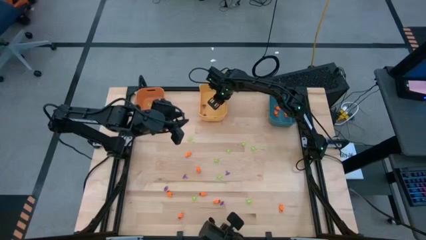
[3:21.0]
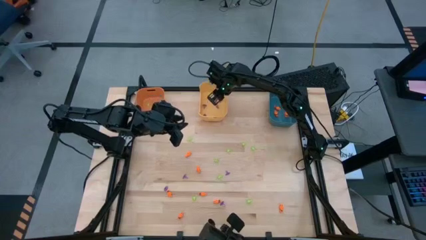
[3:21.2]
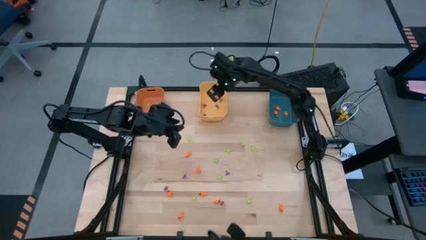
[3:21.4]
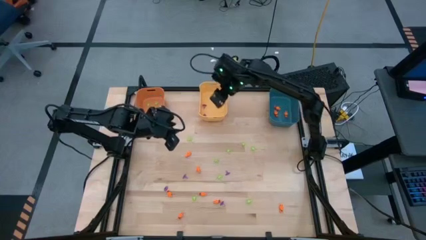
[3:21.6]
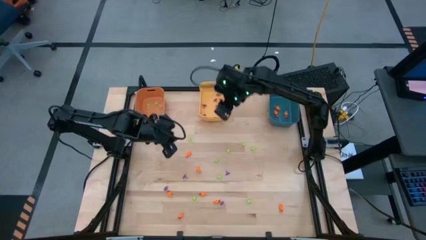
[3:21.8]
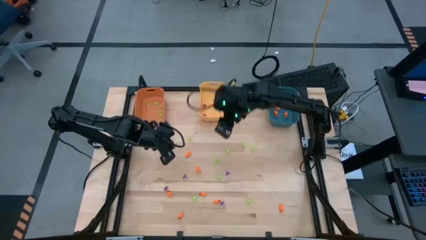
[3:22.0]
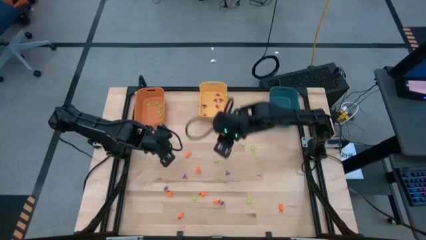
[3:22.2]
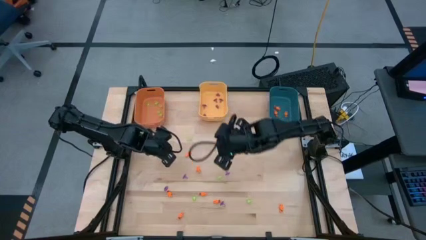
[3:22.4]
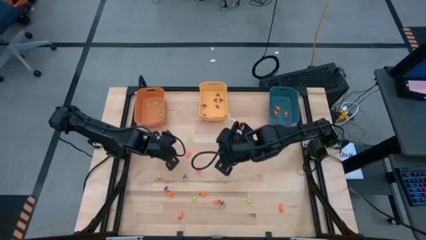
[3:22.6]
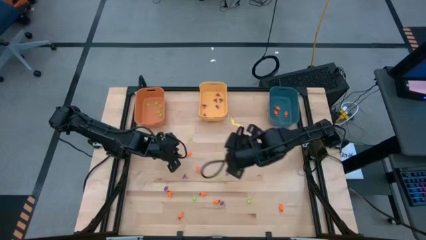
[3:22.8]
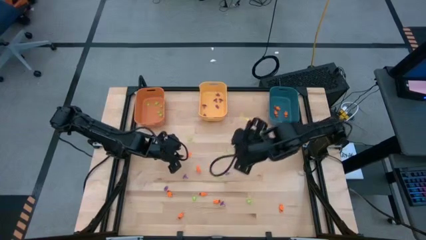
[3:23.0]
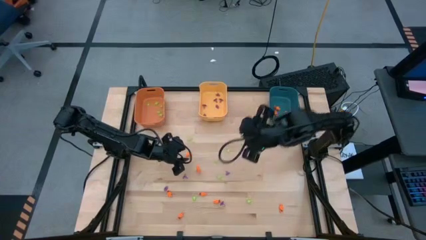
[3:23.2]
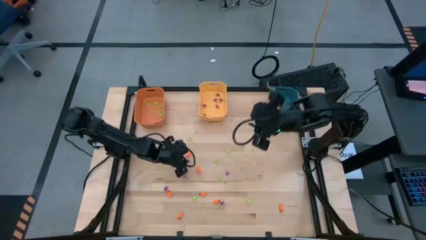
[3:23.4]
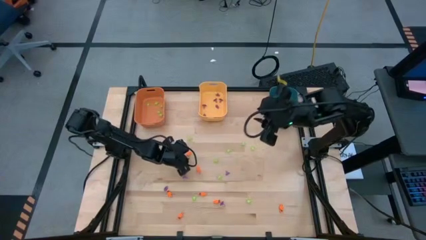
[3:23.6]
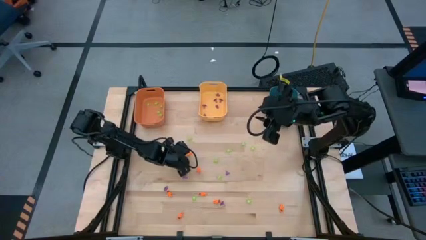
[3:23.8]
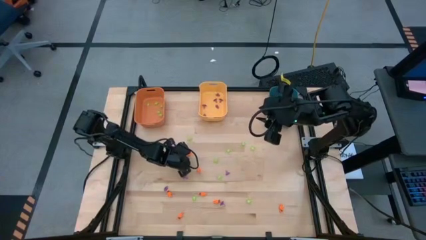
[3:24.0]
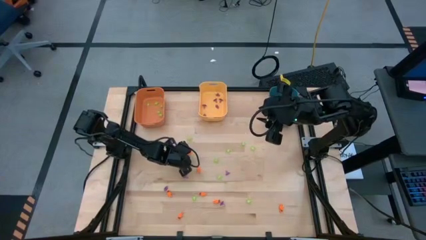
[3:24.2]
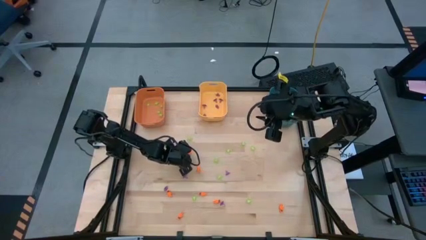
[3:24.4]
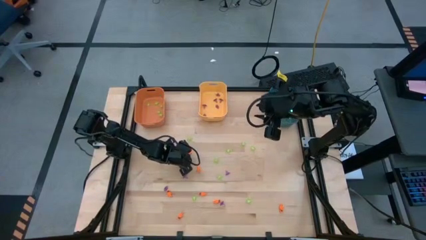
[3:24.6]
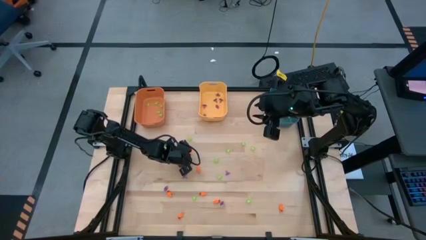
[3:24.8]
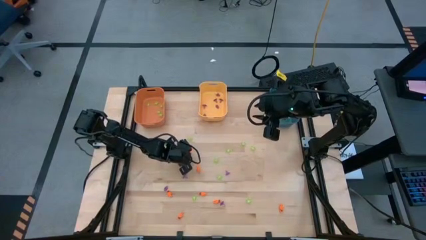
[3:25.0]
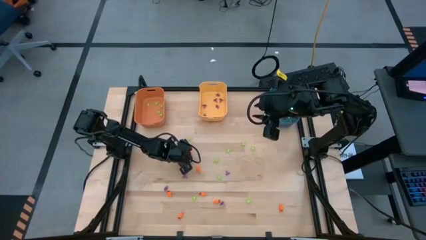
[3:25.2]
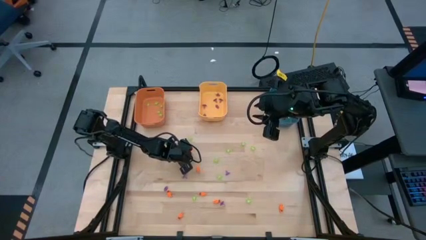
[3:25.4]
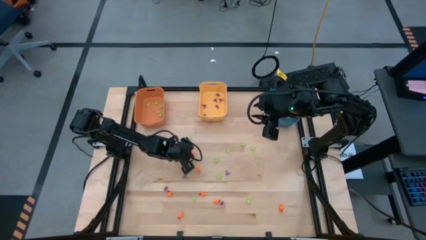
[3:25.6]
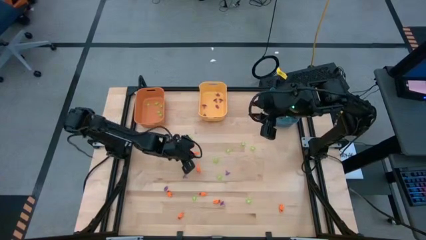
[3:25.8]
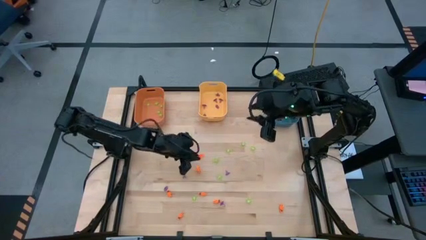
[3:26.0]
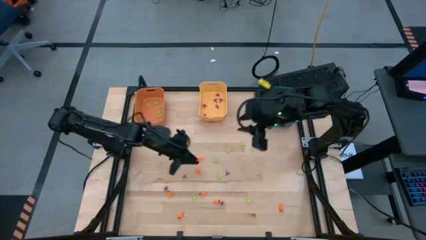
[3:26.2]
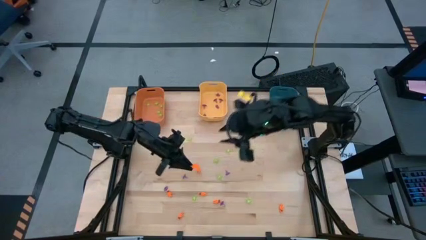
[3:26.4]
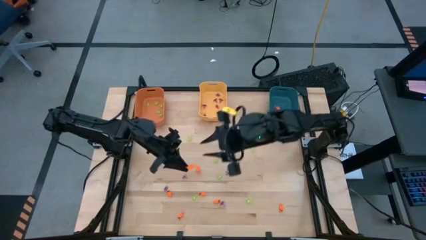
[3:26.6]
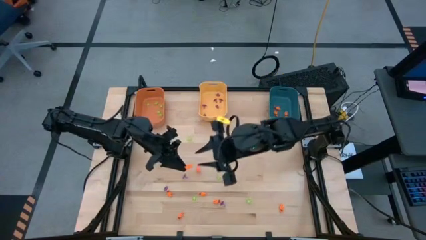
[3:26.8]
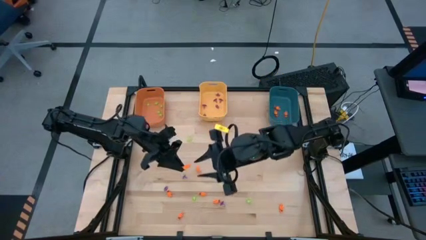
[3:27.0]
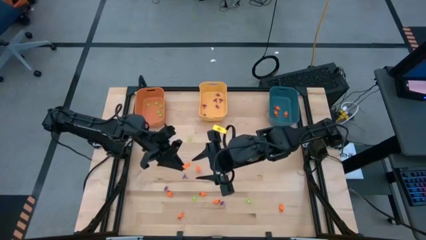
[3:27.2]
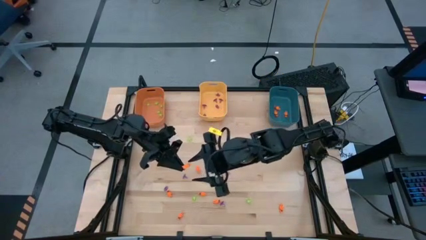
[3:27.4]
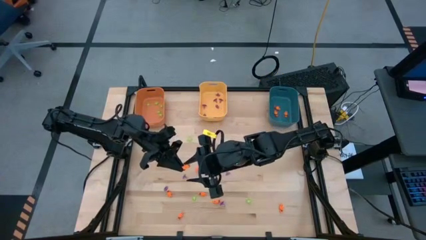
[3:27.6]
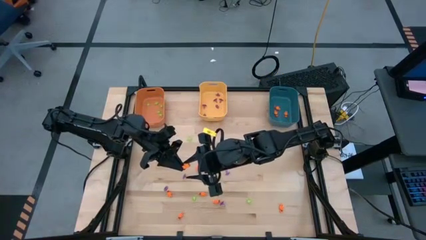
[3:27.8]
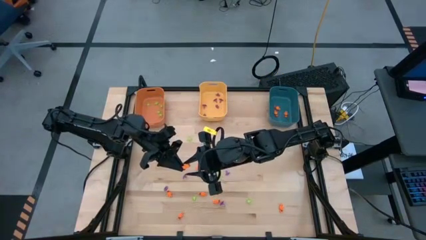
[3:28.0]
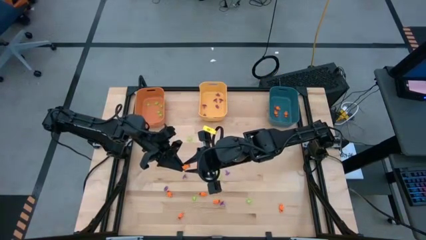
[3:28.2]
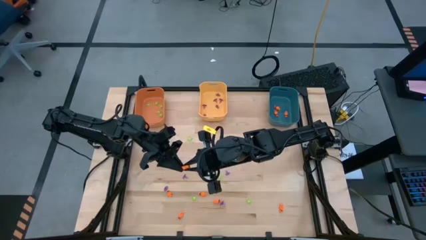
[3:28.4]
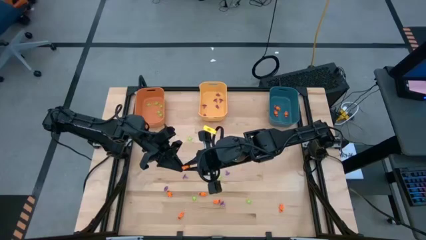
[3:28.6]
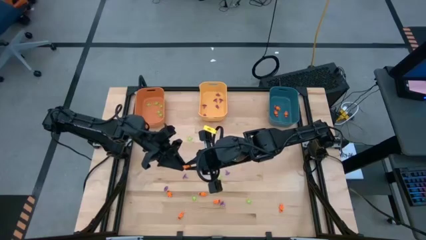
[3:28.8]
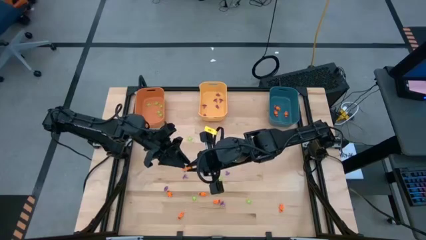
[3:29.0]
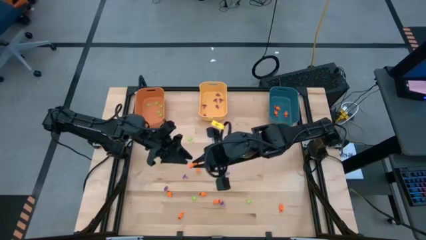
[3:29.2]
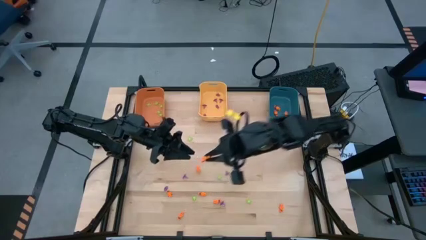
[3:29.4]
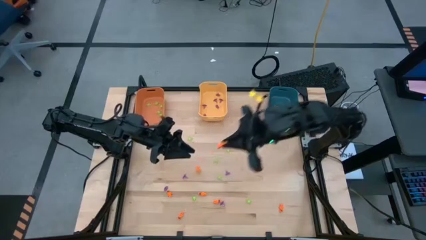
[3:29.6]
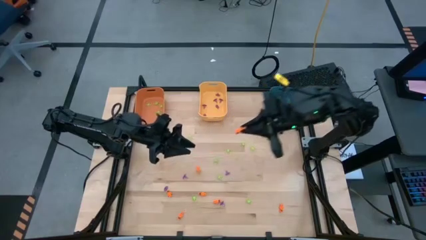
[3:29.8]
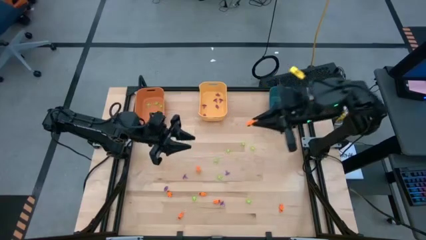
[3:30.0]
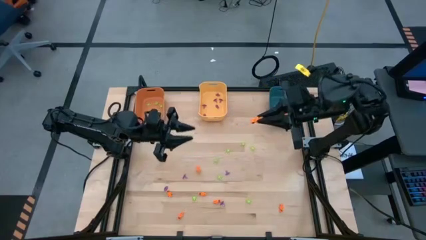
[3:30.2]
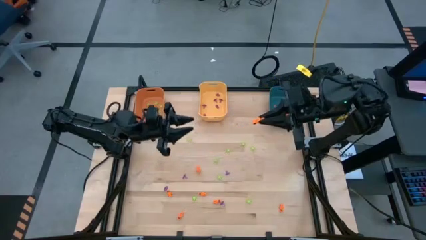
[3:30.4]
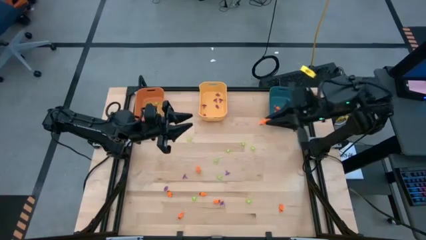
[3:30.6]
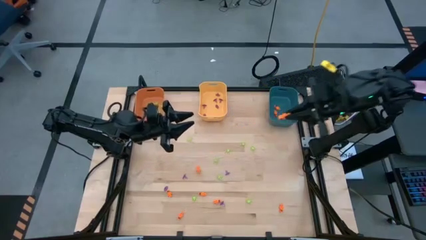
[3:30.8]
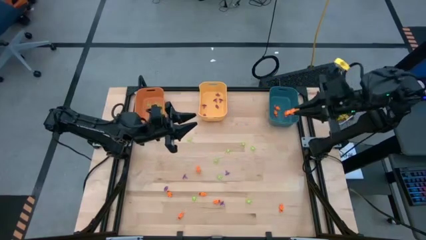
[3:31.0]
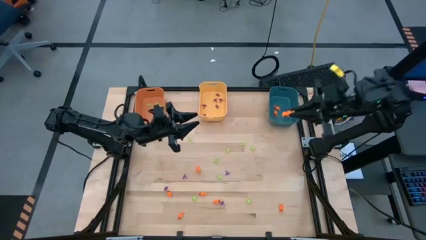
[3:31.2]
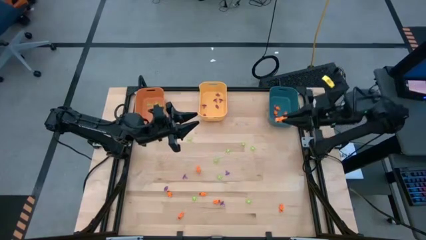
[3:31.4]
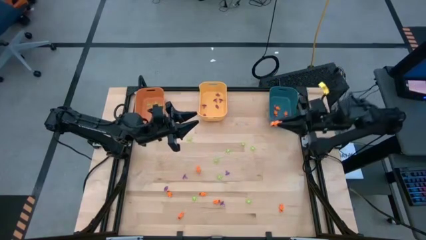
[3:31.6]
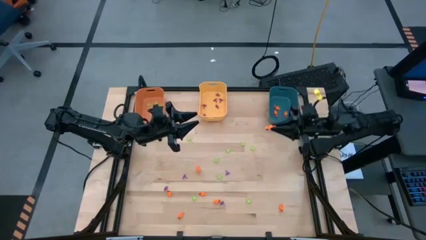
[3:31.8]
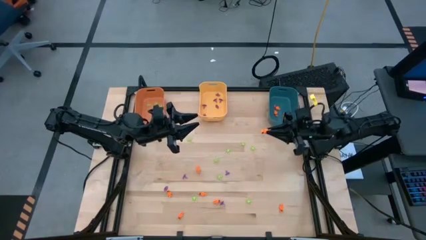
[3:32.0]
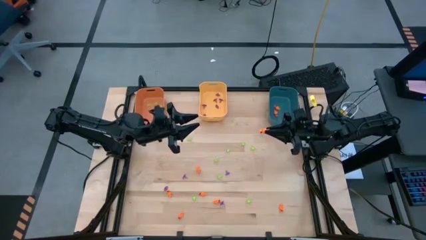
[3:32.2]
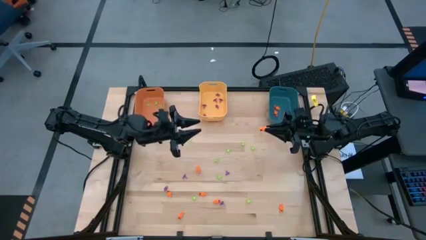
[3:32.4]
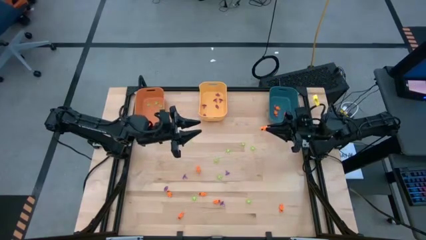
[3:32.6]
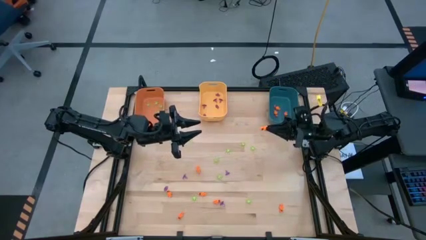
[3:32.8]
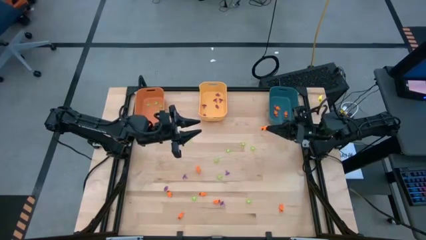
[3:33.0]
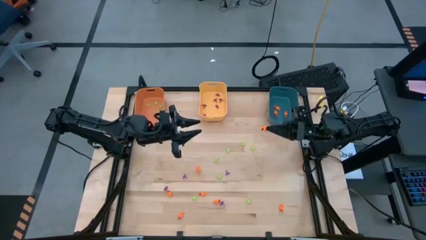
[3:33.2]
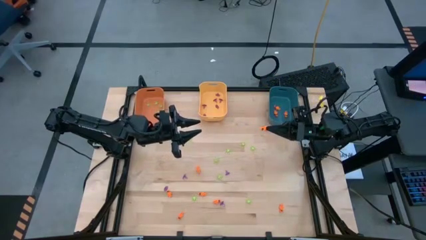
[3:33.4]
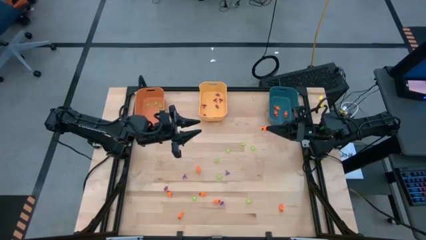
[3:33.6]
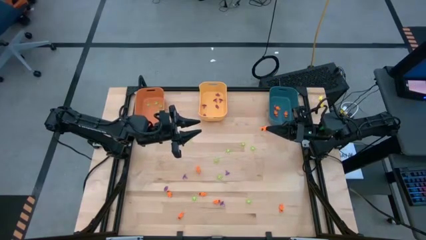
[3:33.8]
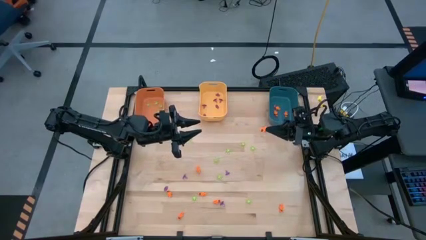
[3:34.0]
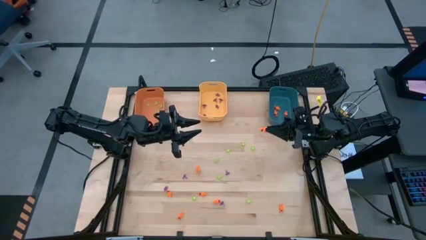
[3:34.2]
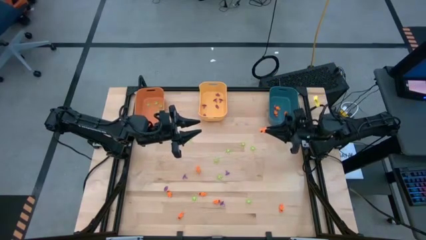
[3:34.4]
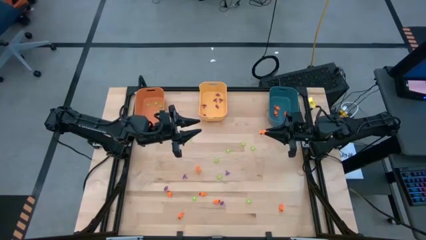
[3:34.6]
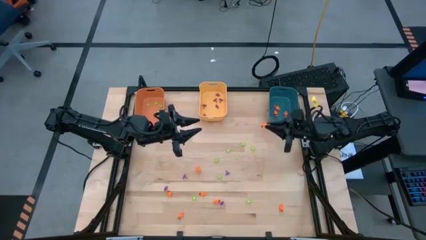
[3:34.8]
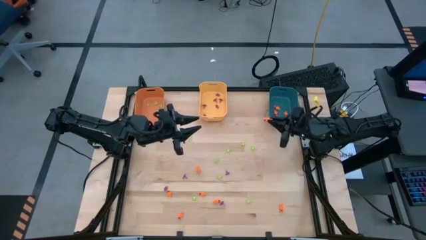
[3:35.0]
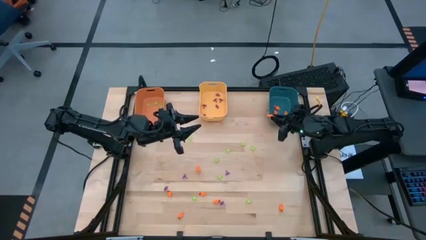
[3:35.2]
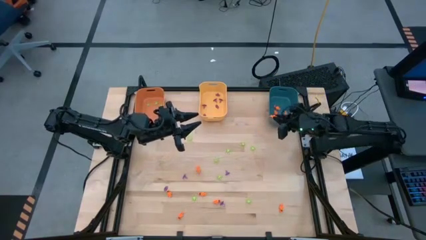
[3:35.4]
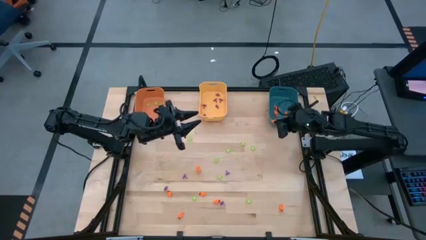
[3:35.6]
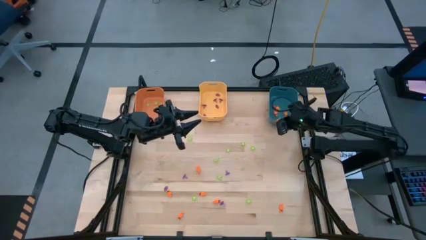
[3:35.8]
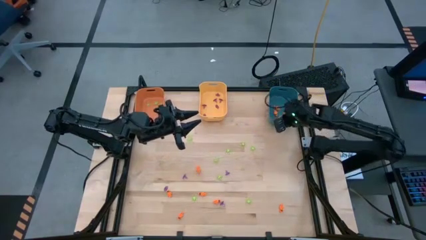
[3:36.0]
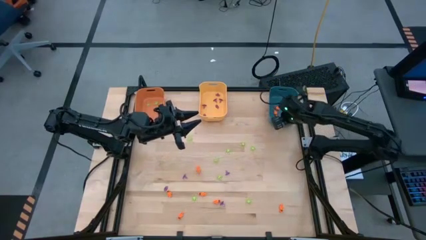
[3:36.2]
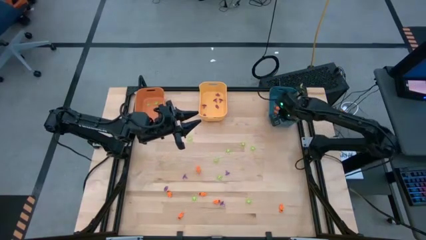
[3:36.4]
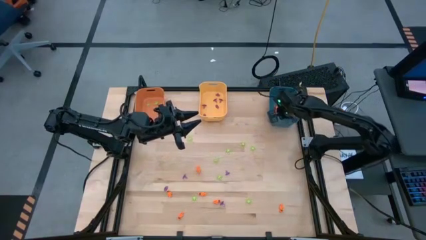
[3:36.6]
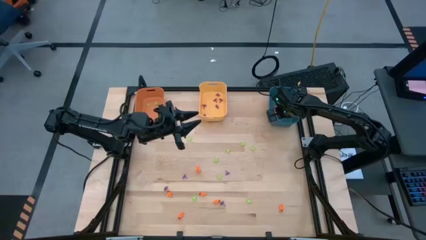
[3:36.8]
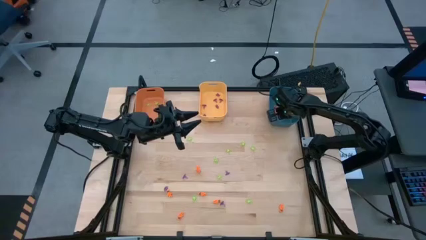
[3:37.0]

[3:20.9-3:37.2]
Task: Sort Halloween decoration
Put the orange skeleton toy into the blue bin

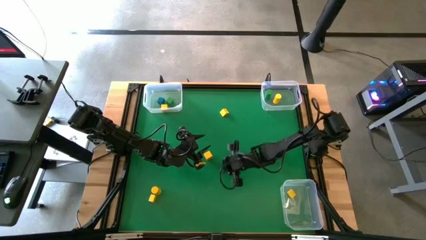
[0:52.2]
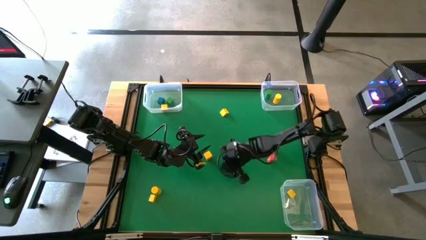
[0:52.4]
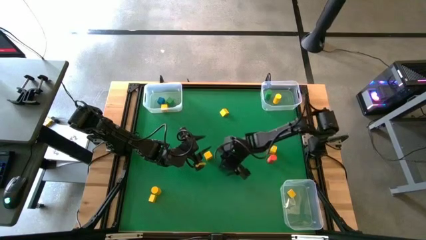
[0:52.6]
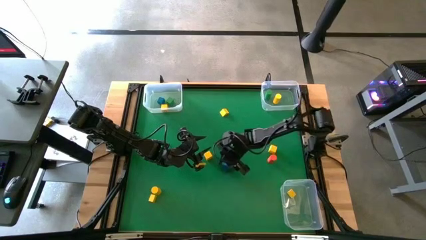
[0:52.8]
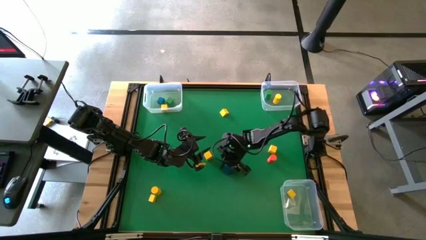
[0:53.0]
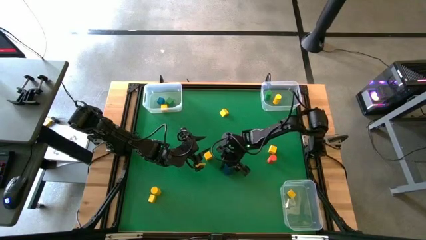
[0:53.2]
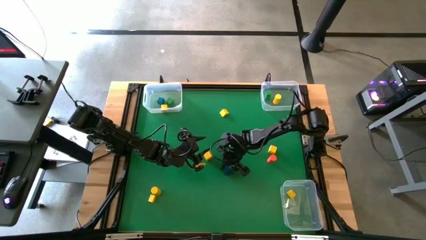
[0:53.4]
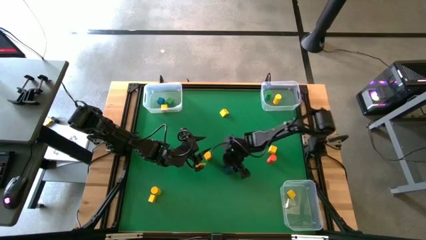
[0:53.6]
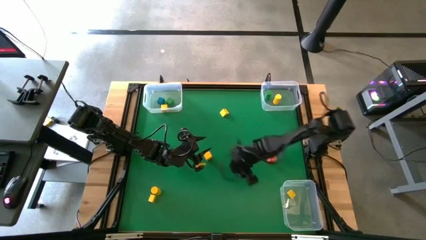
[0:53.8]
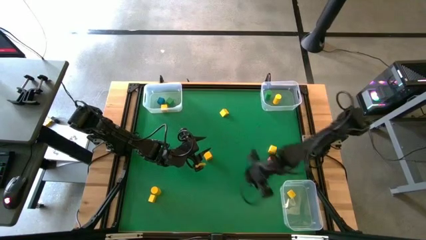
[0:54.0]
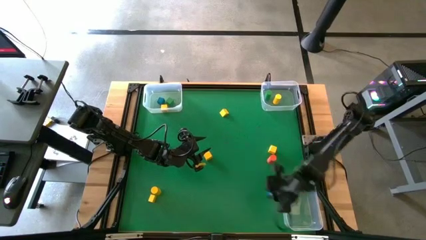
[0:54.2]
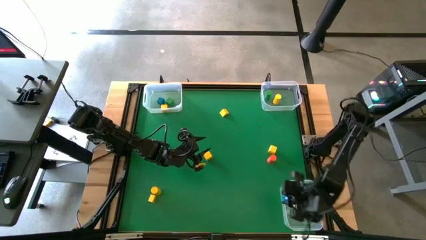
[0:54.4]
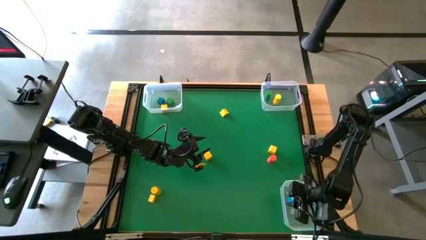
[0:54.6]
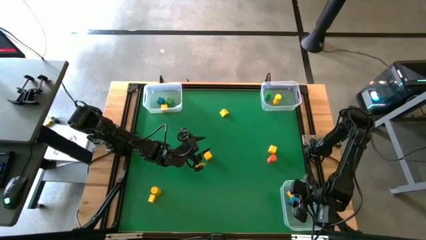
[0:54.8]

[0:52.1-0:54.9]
Task: Sort blocks by size
Put the blue triangle block into the bottom transparent bin
